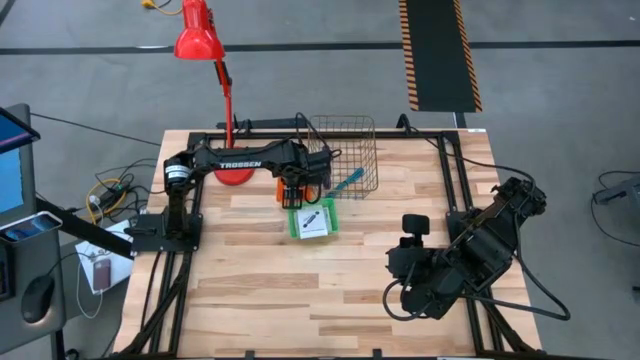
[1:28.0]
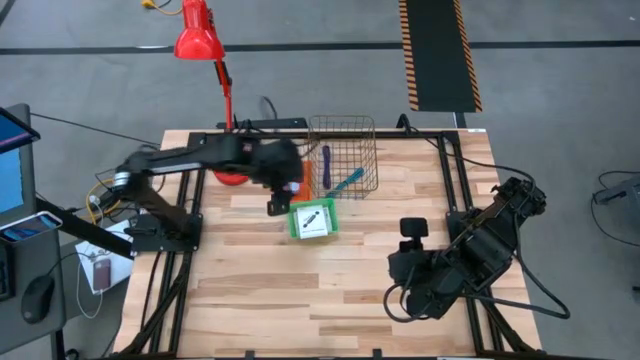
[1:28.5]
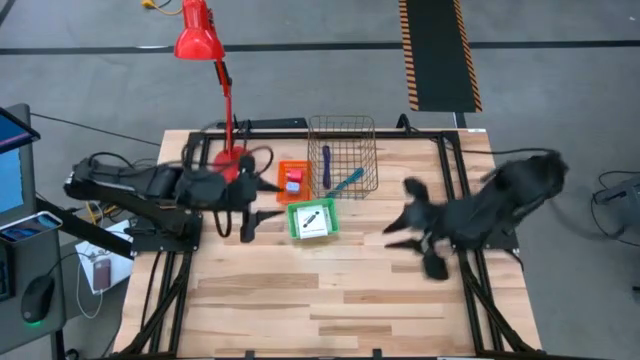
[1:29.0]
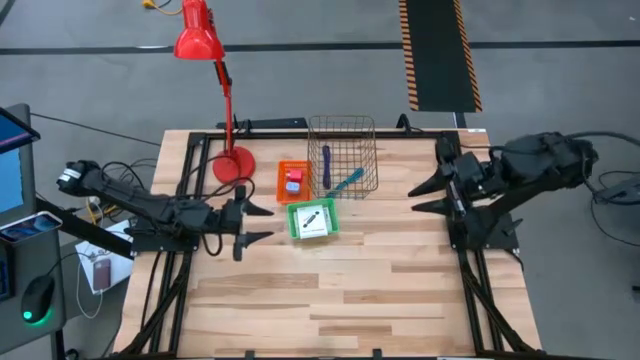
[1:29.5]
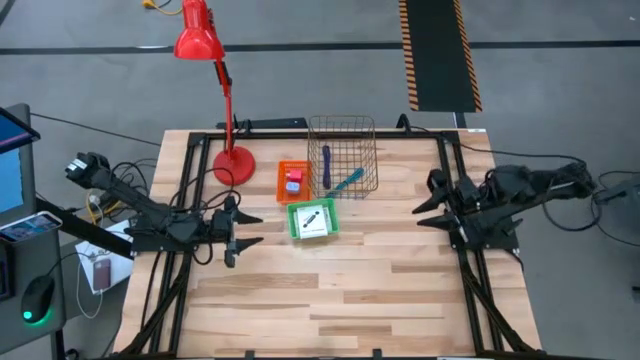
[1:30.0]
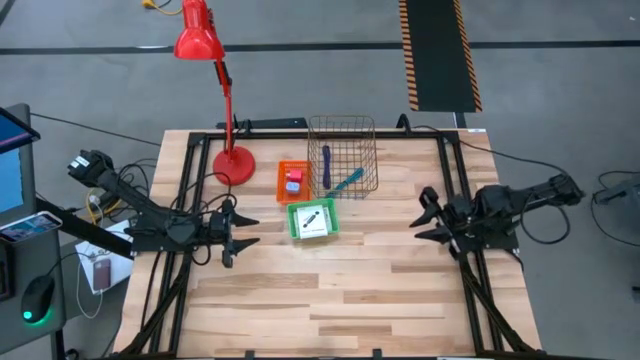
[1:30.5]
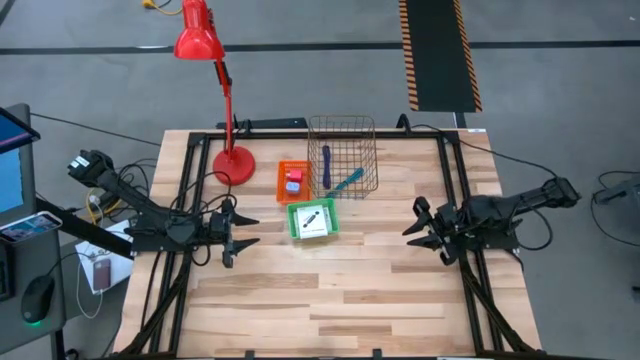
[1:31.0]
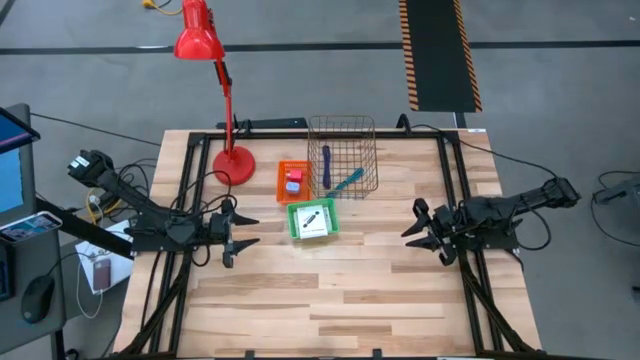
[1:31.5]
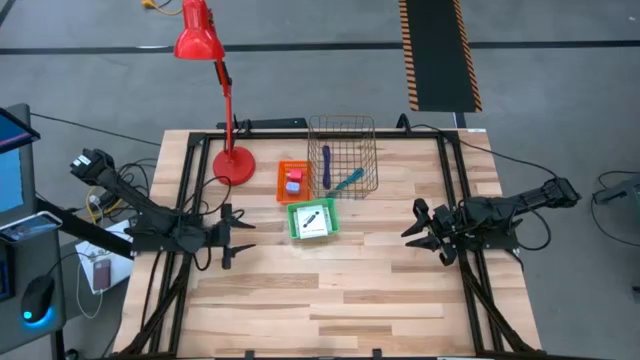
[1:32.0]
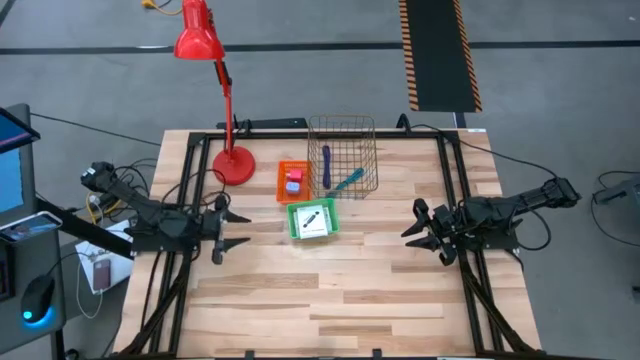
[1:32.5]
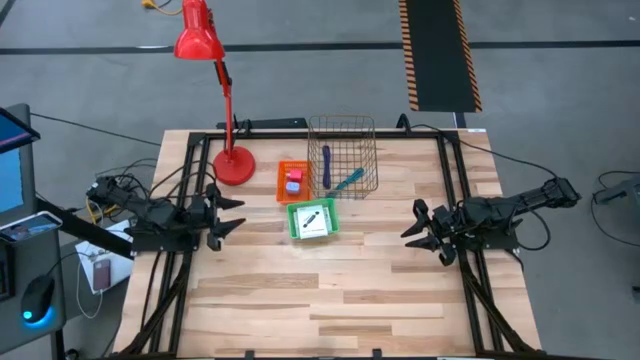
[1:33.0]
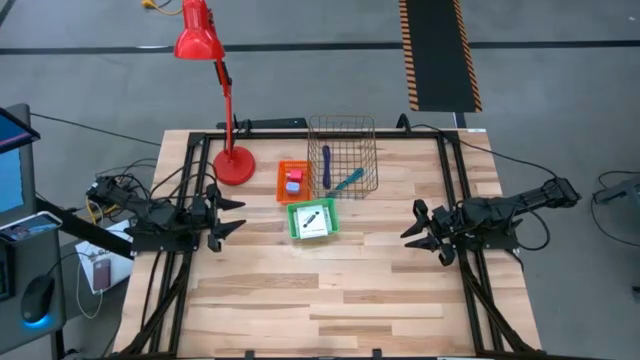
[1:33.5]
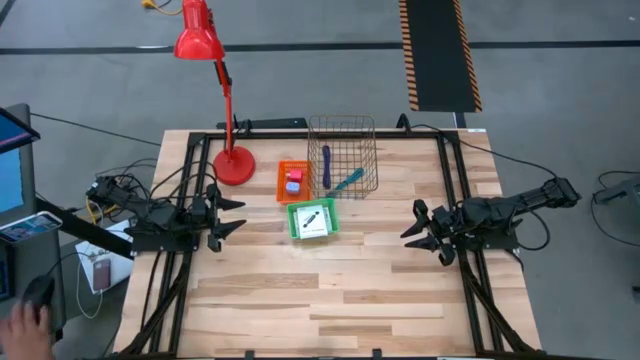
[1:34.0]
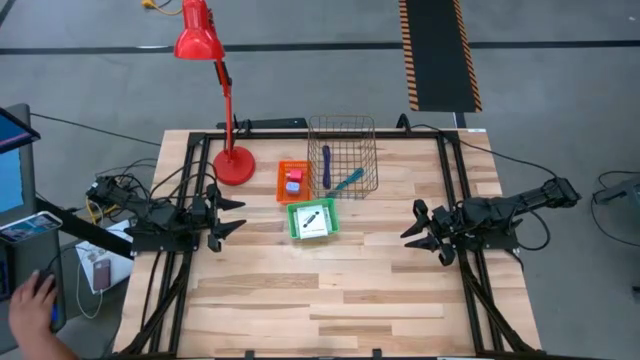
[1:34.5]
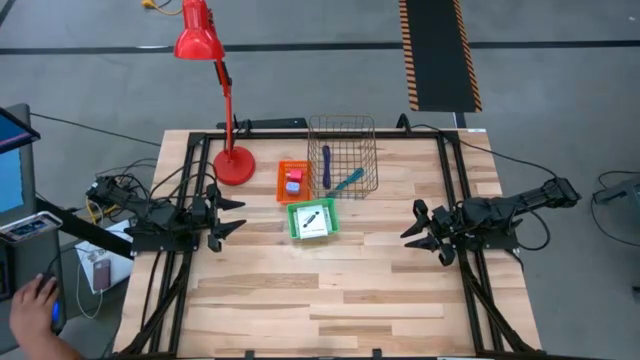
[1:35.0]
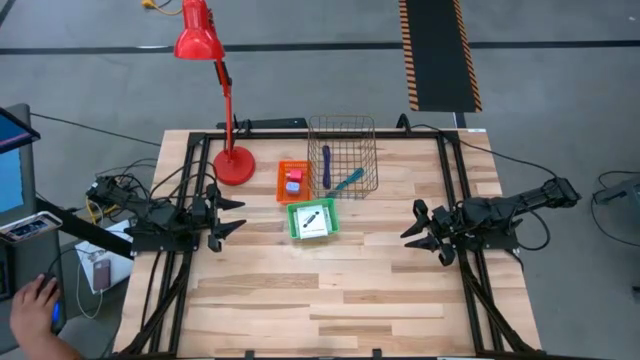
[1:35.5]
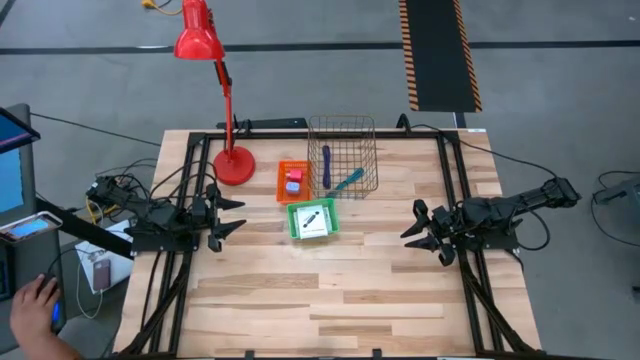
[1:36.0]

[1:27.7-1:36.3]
Task: Pick and place items into bin
Return to Home Position

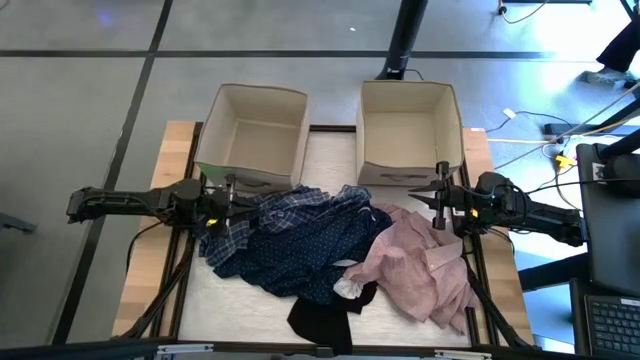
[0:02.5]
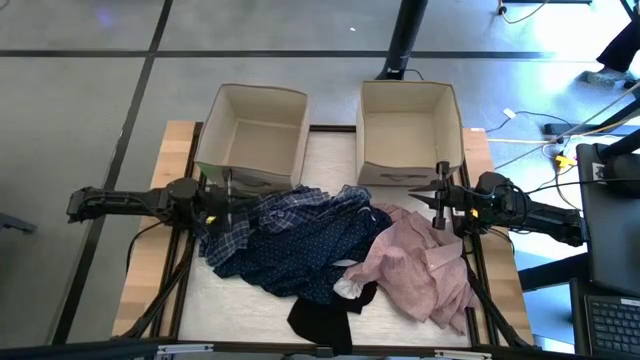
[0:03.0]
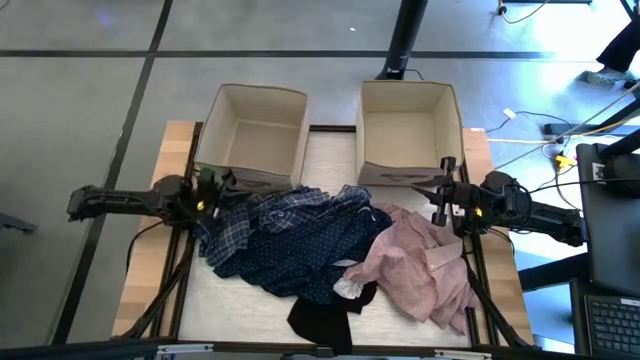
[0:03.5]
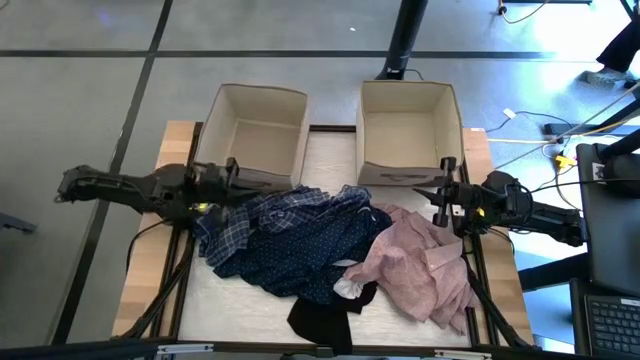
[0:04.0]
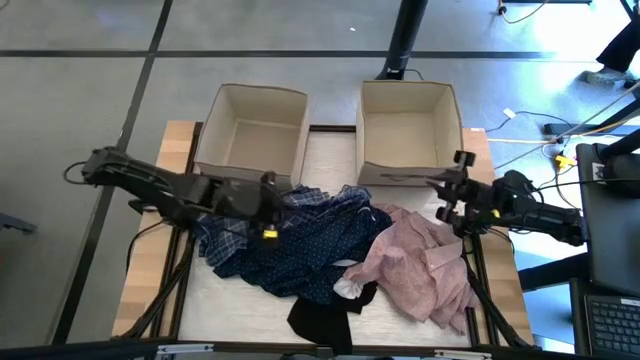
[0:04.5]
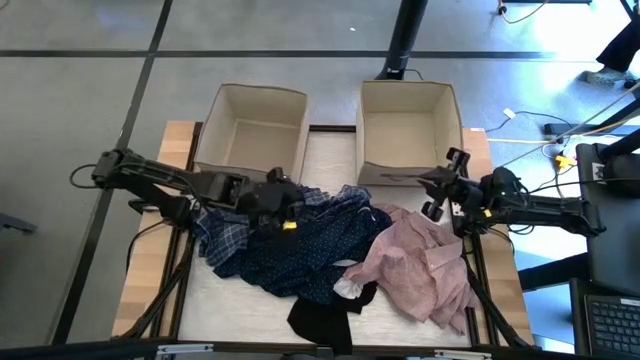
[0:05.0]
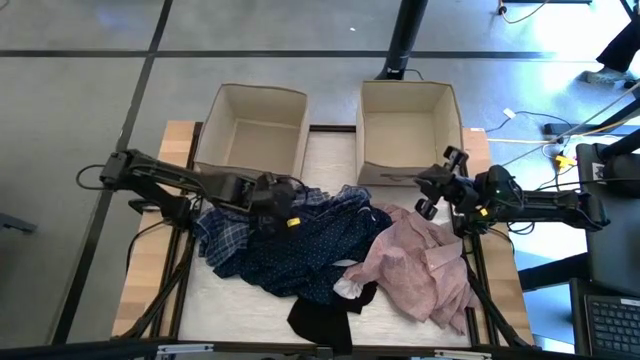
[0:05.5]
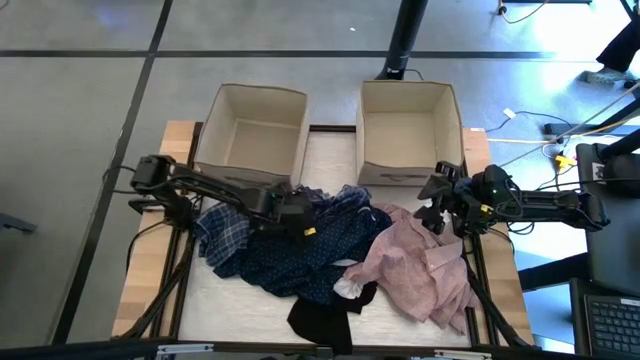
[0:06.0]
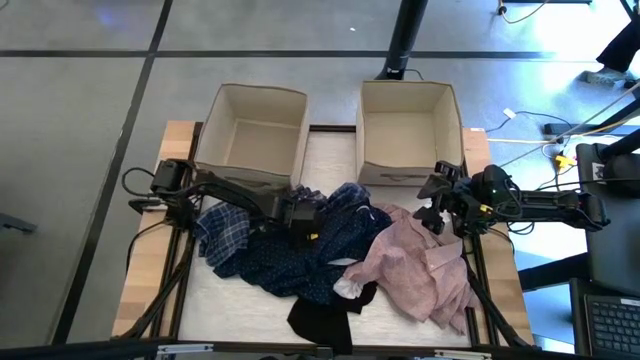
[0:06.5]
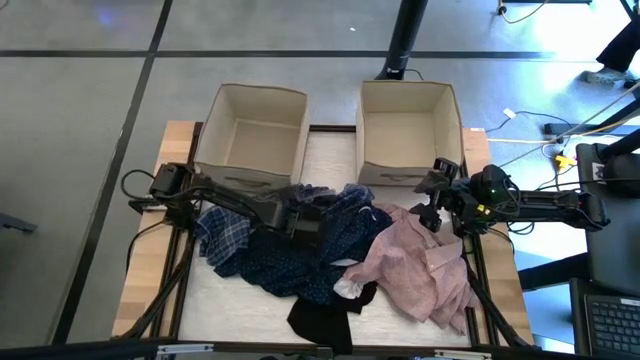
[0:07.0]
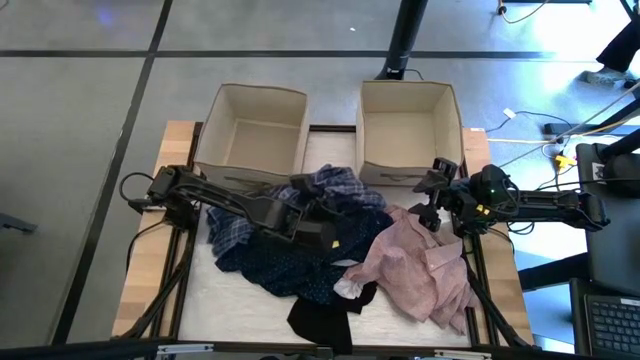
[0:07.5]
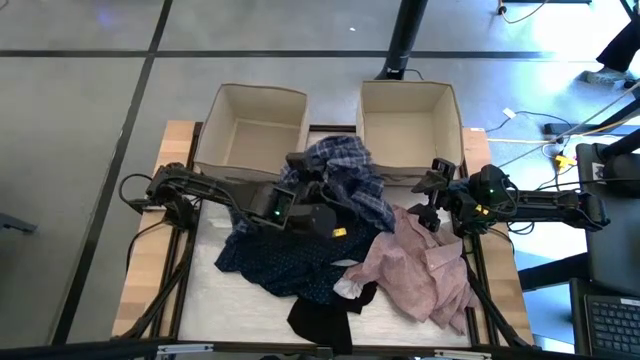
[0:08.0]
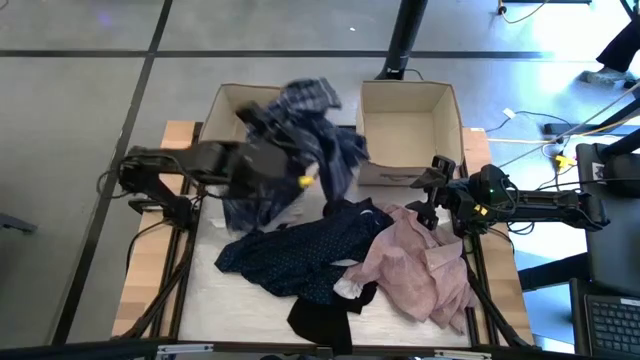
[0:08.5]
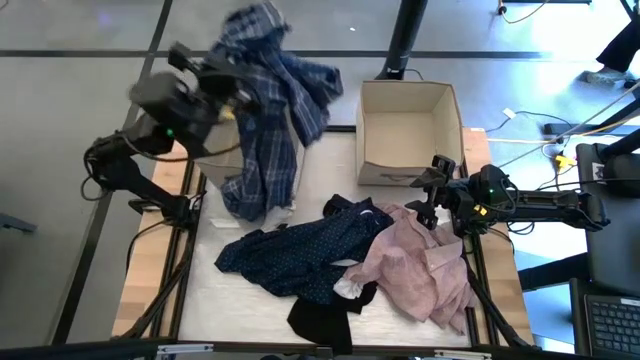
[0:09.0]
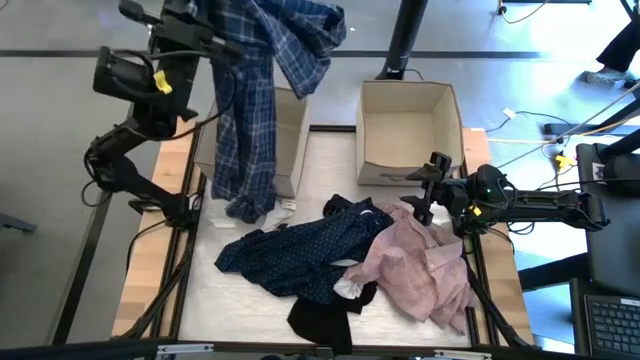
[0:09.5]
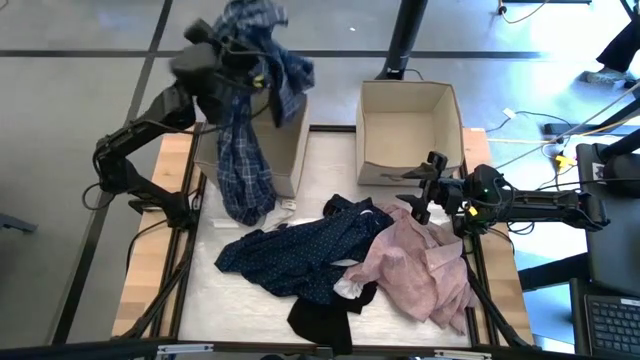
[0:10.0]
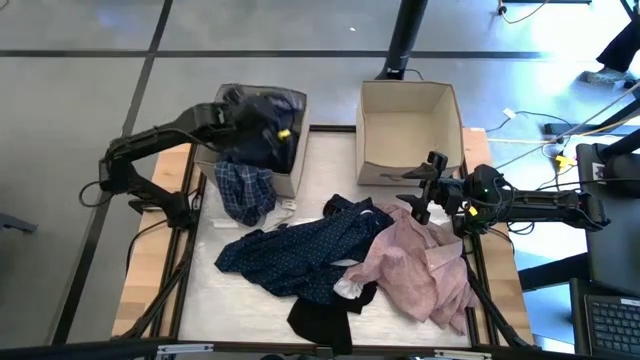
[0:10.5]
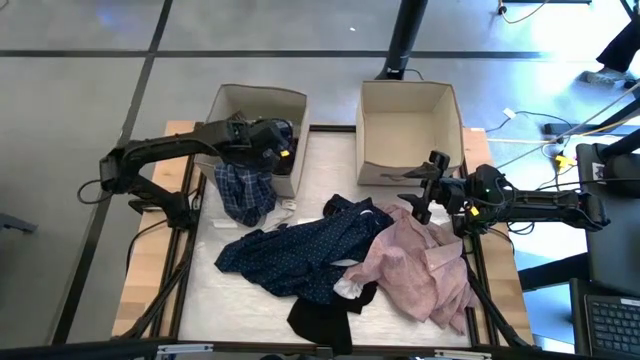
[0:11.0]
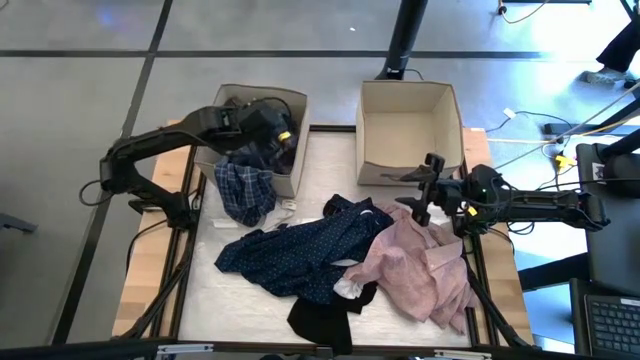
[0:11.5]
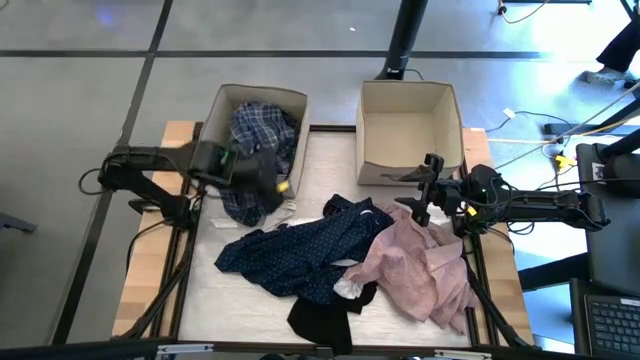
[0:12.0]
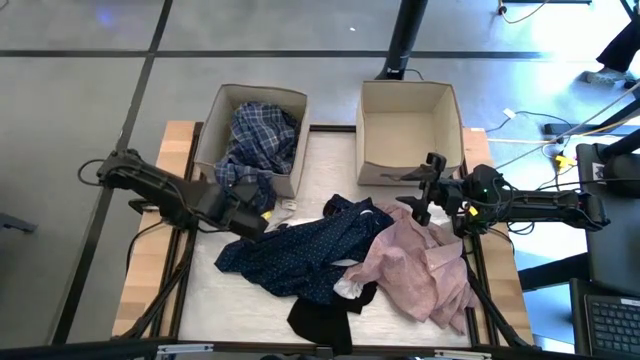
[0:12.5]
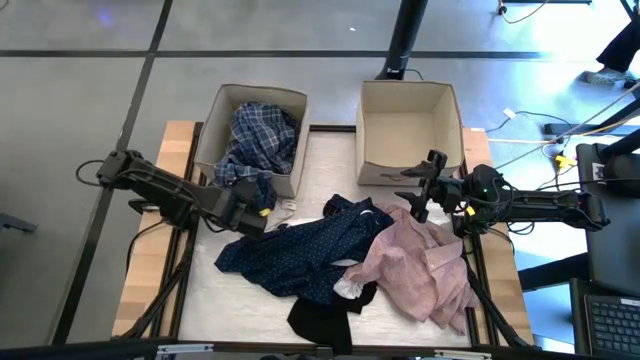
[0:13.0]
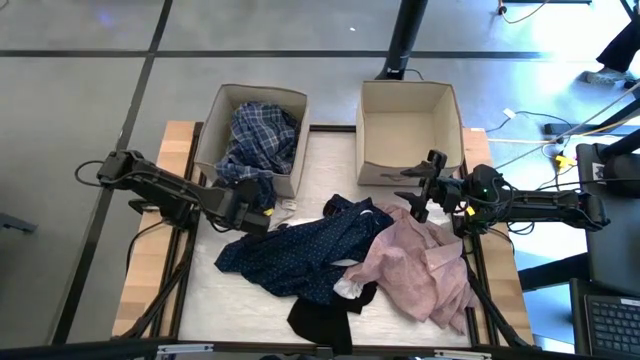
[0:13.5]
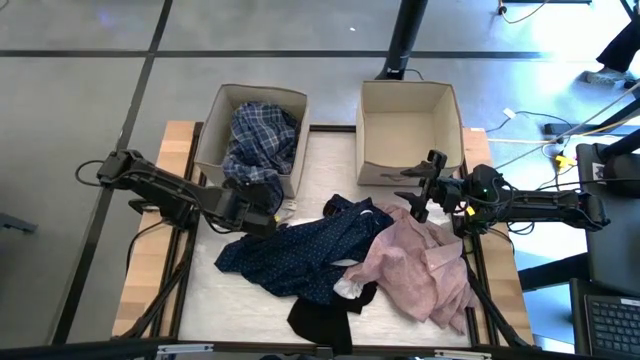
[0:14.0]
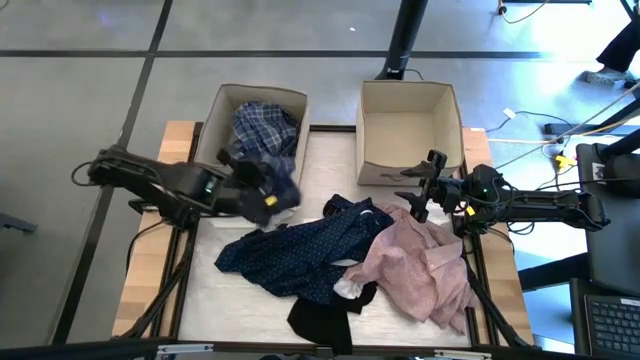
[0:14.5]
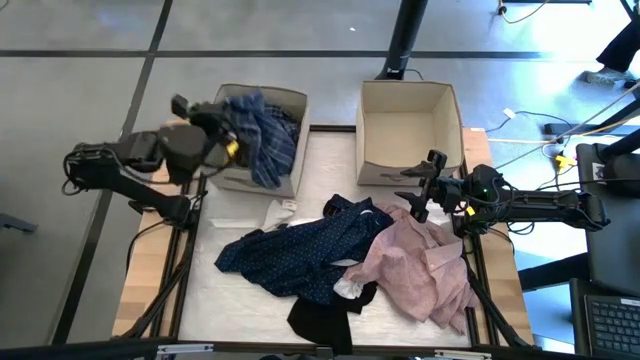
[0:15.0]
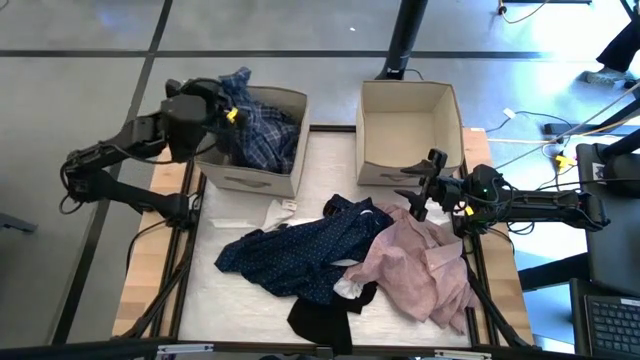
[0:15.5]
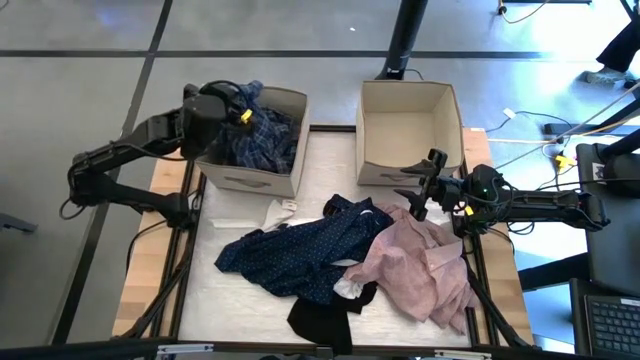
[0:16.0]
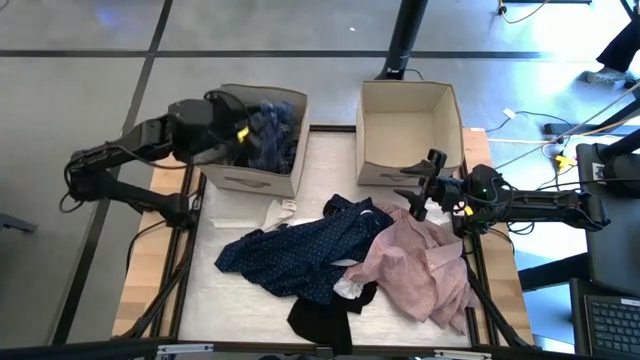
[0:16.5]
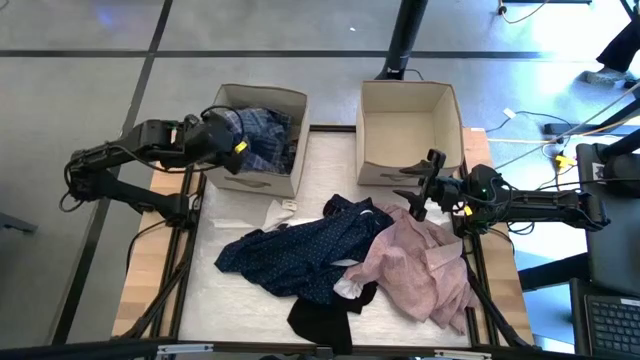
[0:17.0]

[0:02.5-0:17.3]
Task: Sort clothes
Put the blue checkered into the left laundry organizer
